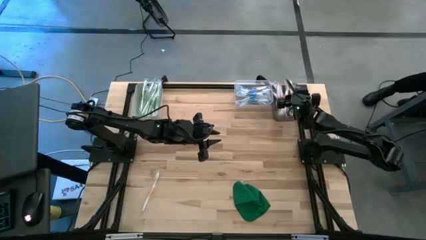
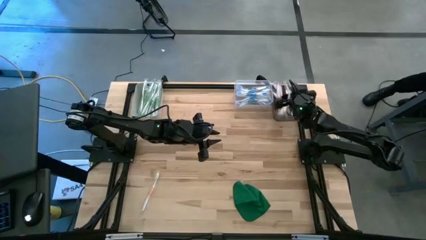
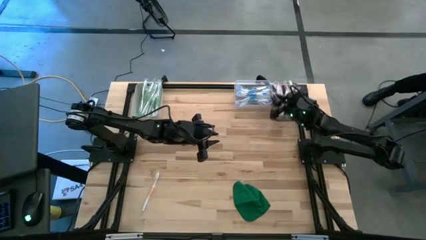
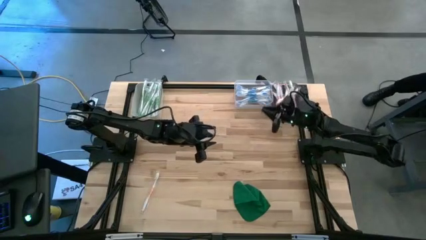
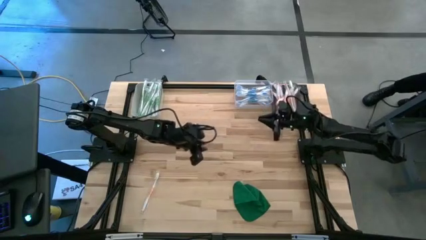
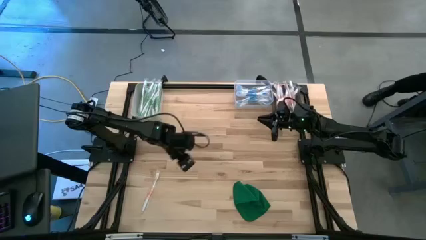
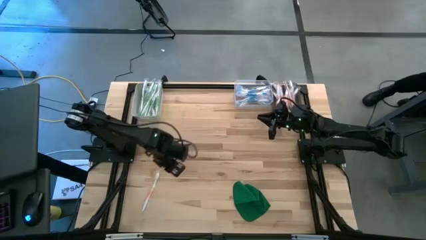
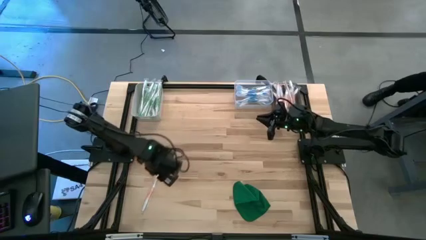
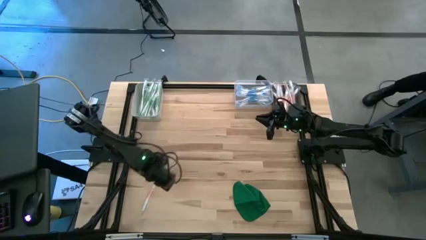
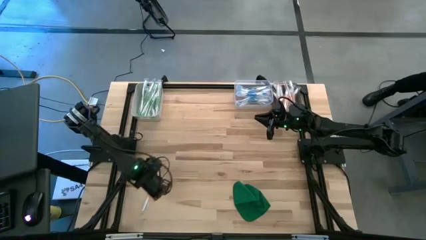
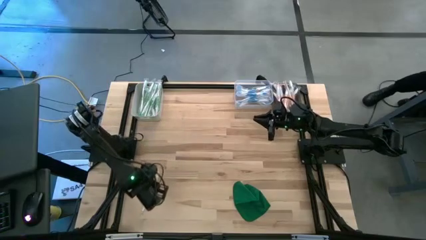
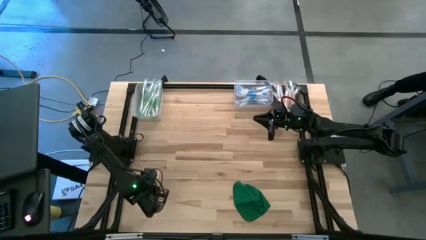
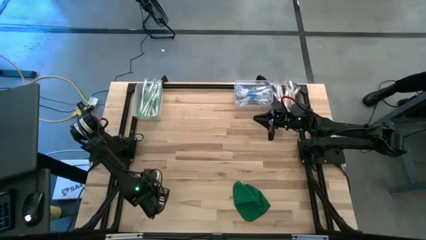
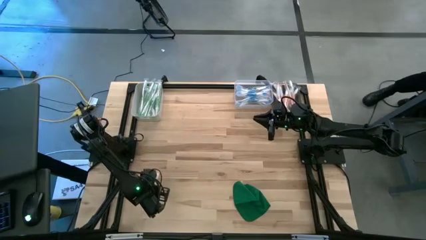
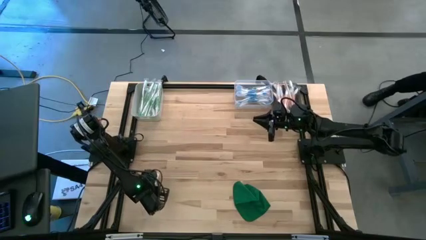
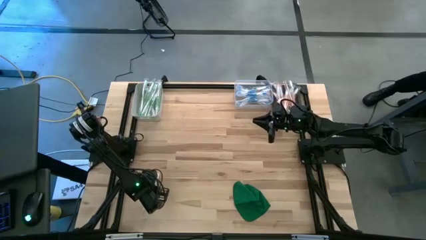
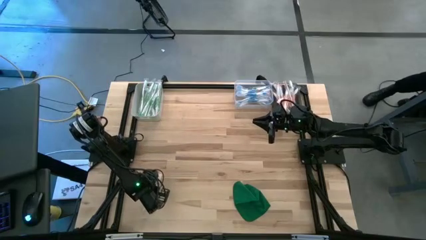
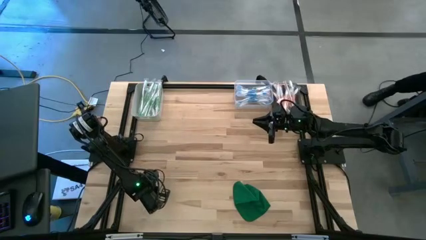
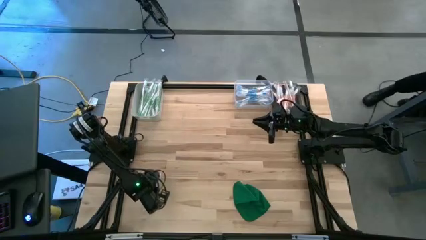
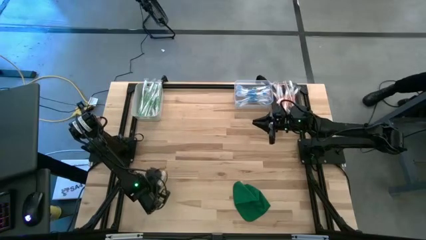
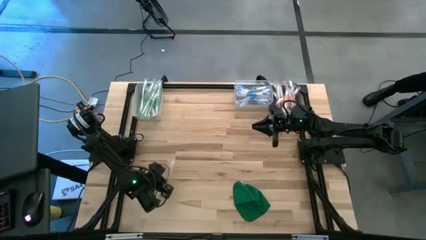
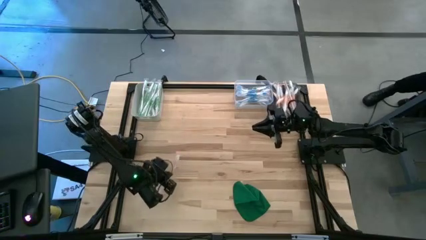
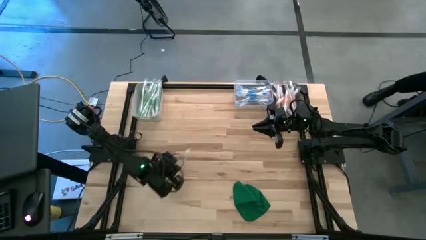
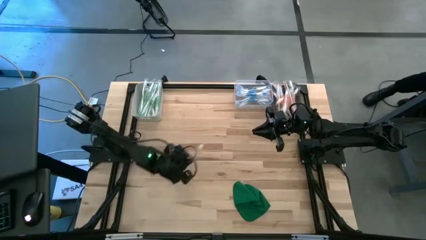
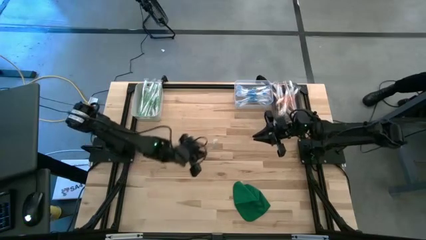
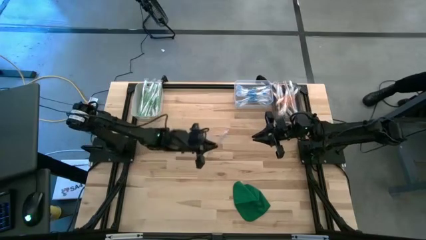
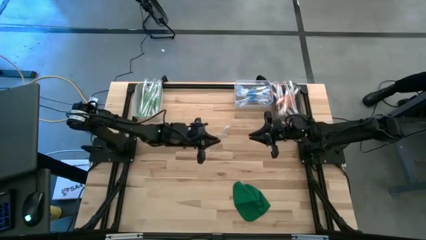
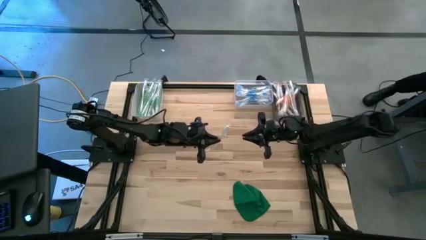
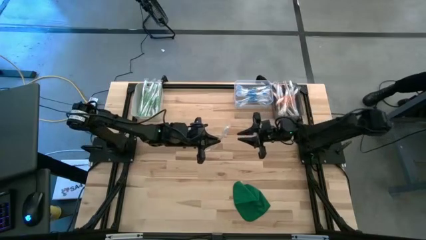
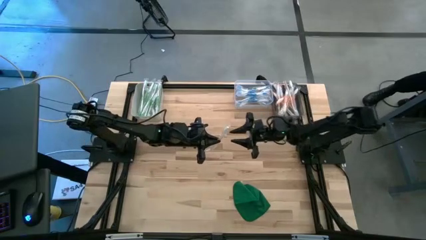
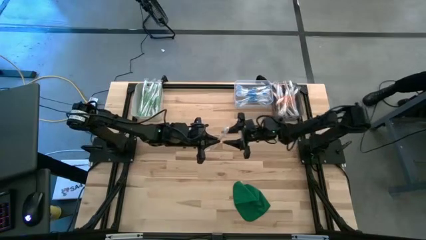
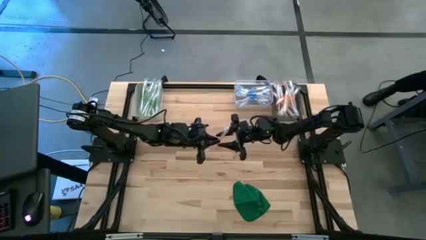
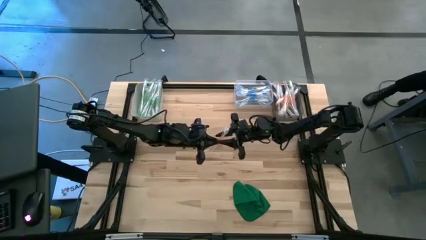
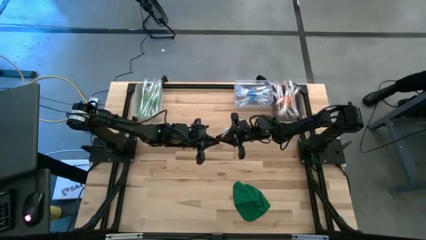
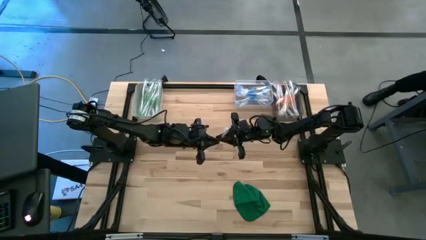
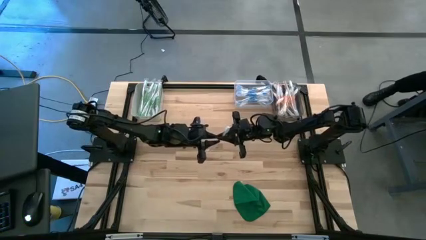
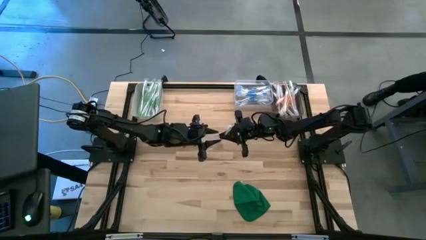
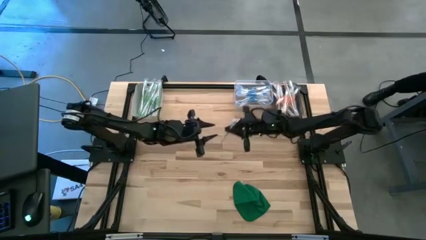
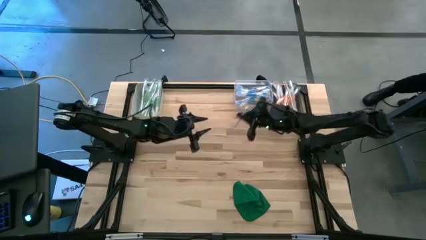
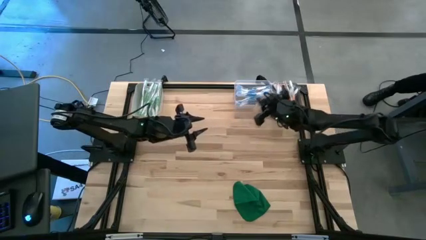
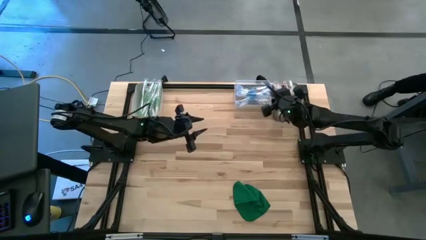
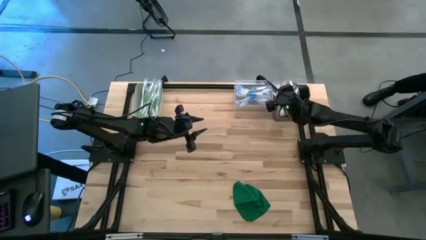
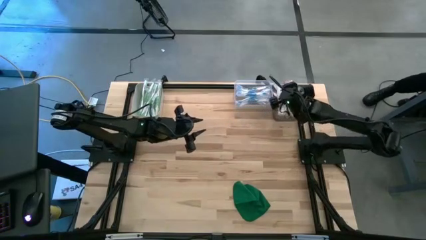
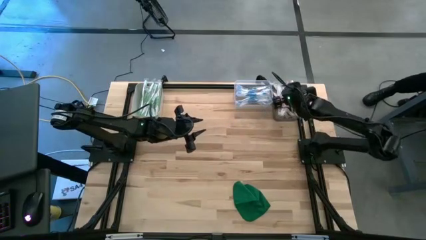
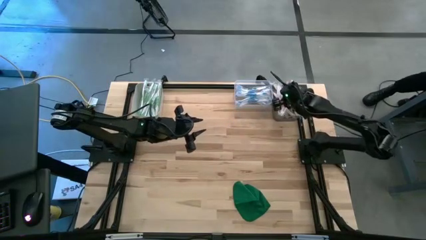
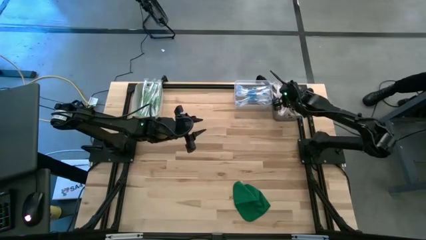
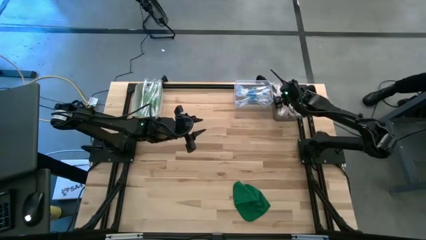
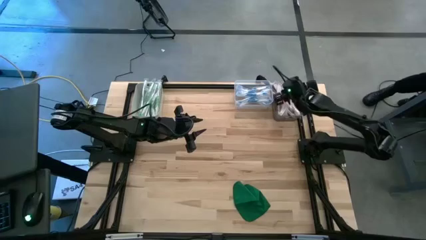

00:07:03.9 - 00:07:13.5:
Task: Pick & Place Toothbrushes
Put the orange toothbrush into the black bin

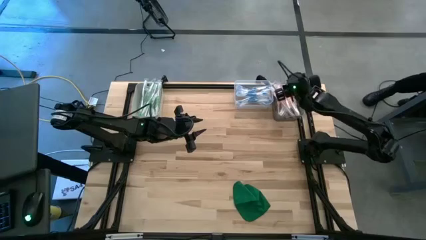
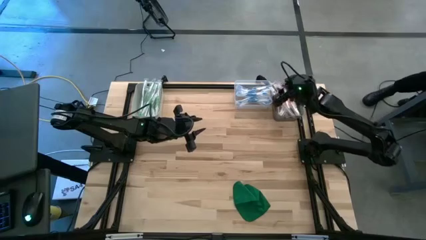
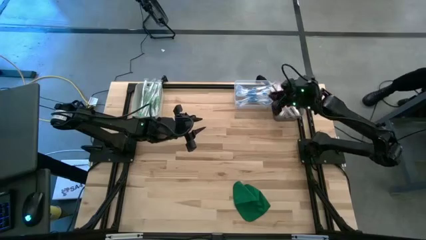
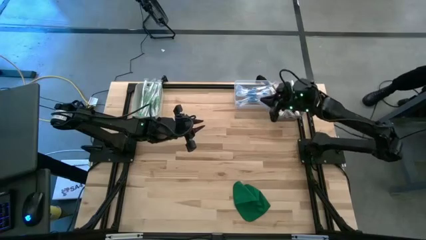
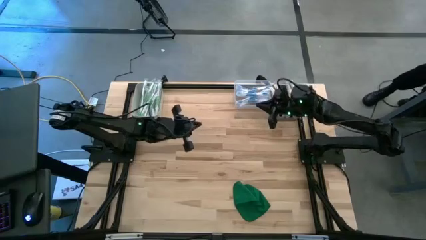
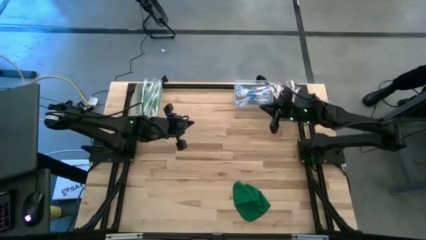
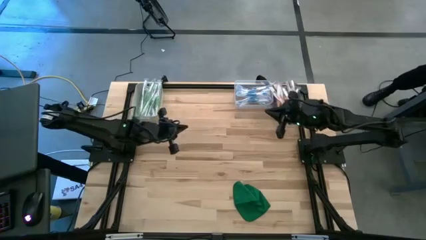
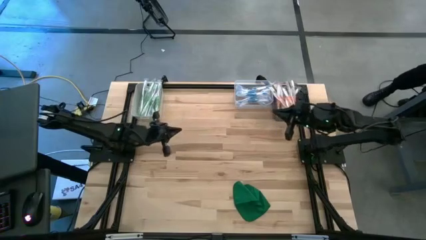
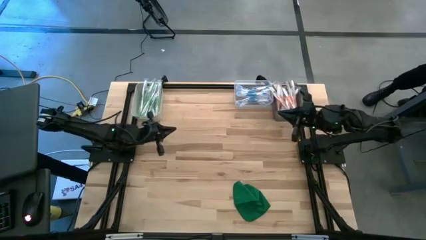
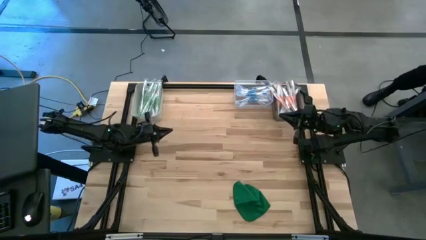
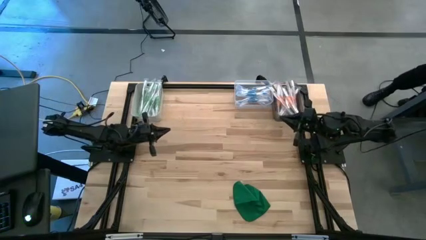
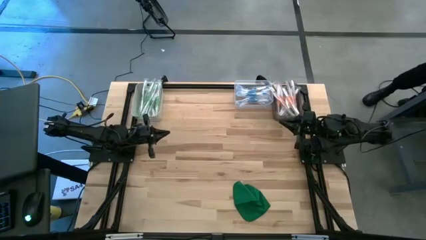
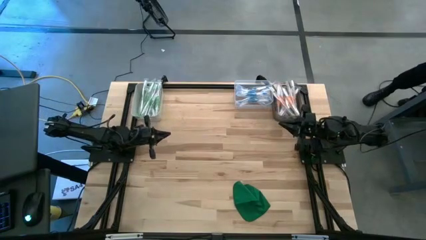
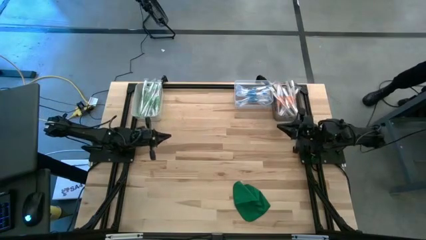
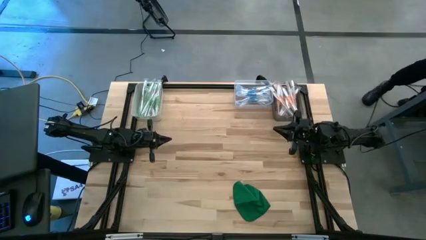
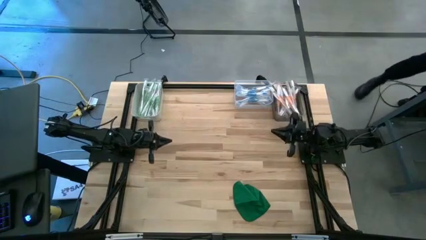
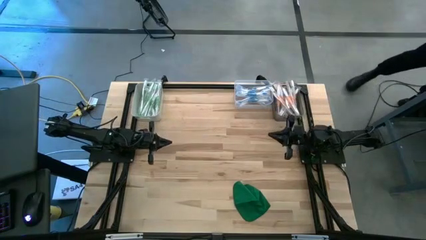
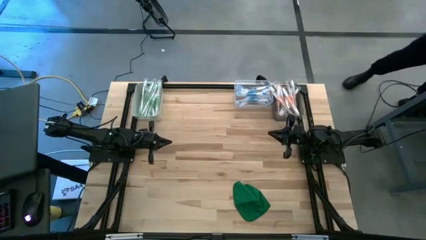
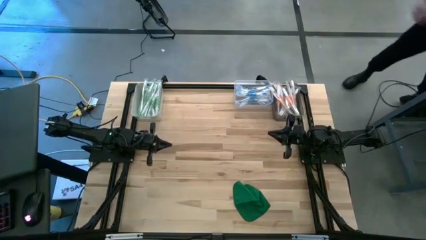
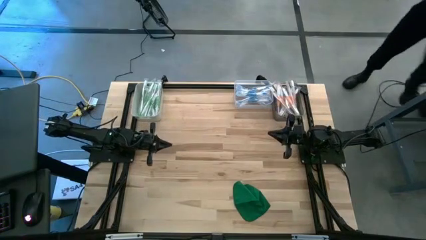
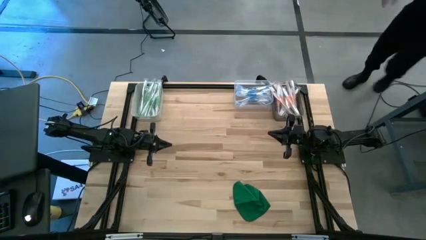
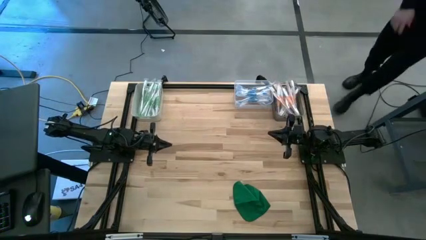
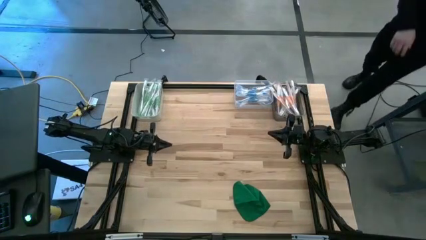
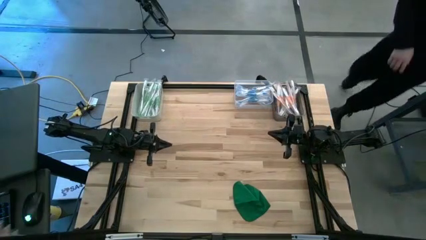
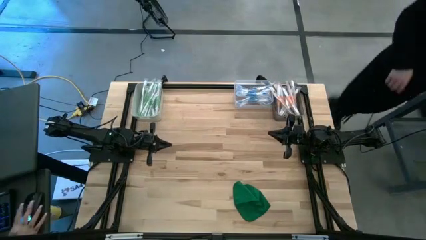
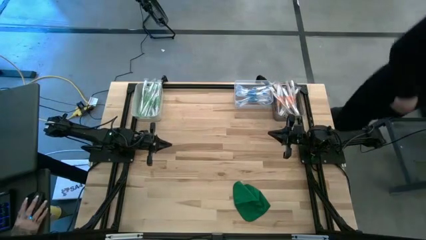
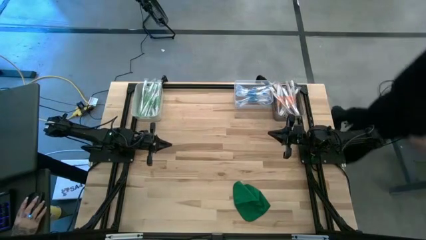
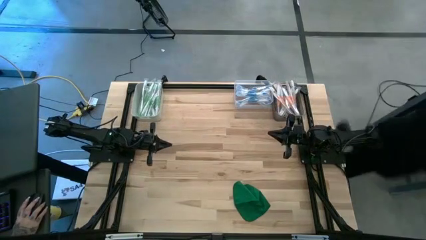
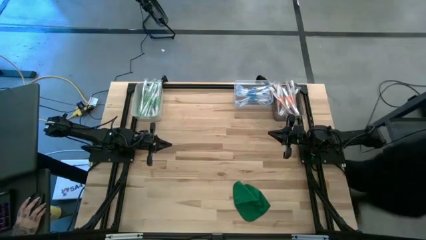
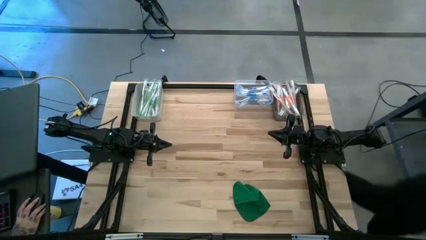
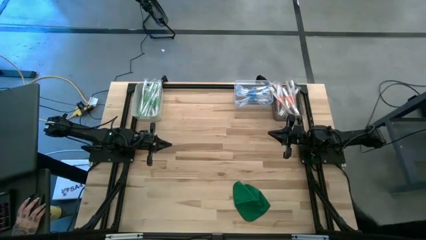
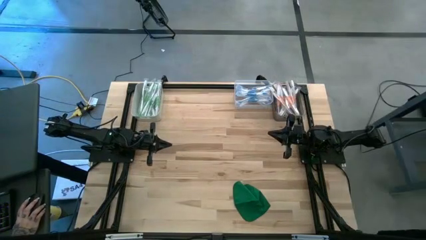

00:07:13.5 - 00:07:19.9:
Return to Home Position
